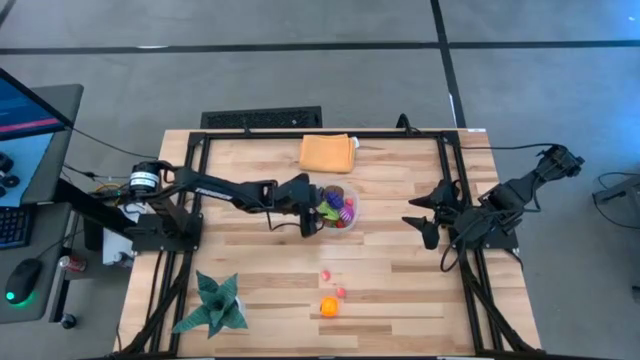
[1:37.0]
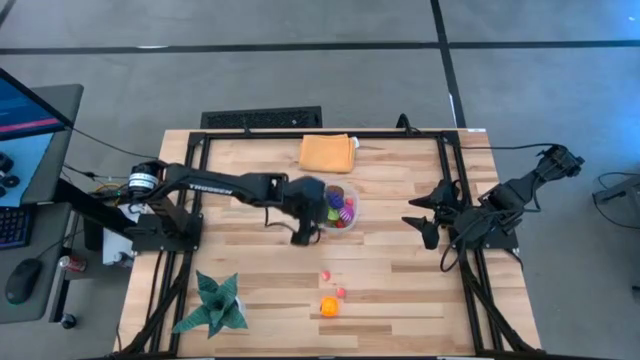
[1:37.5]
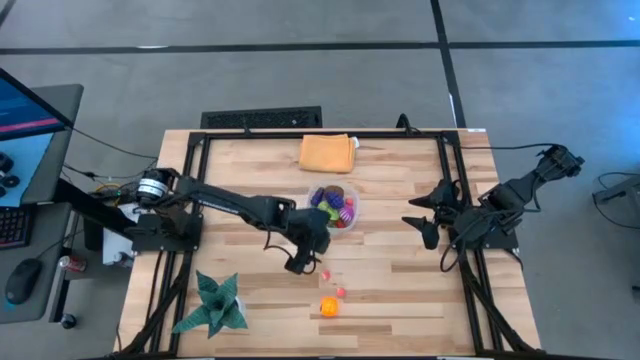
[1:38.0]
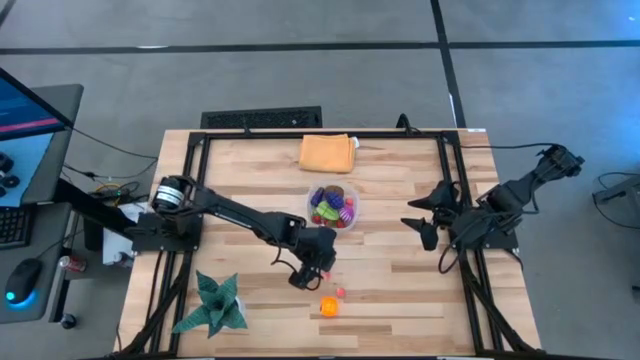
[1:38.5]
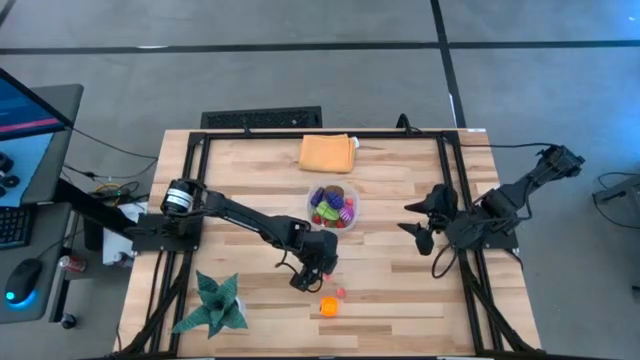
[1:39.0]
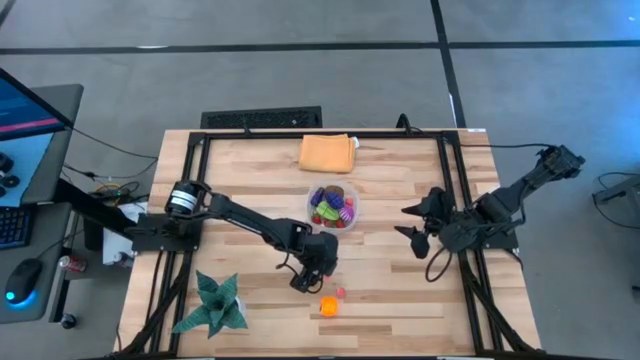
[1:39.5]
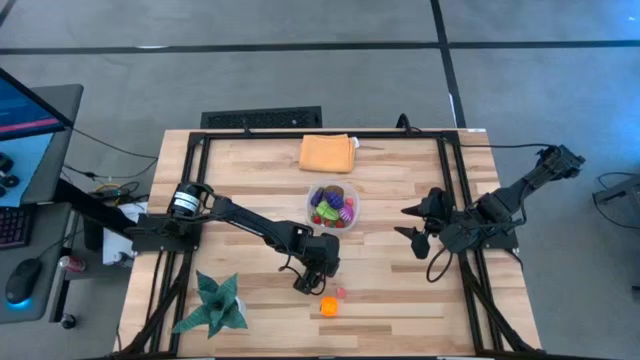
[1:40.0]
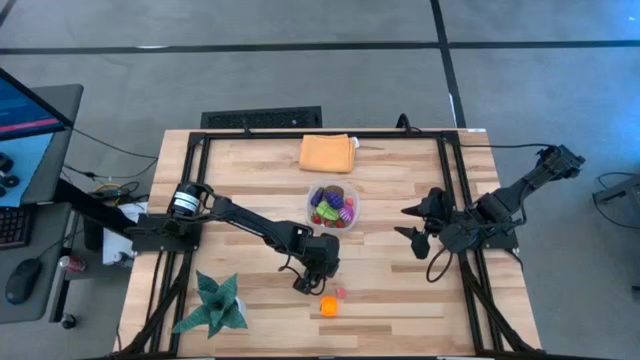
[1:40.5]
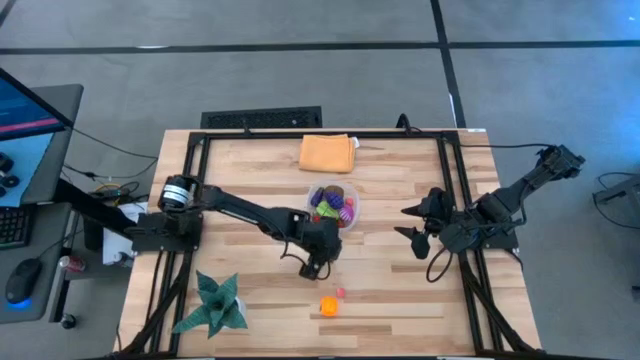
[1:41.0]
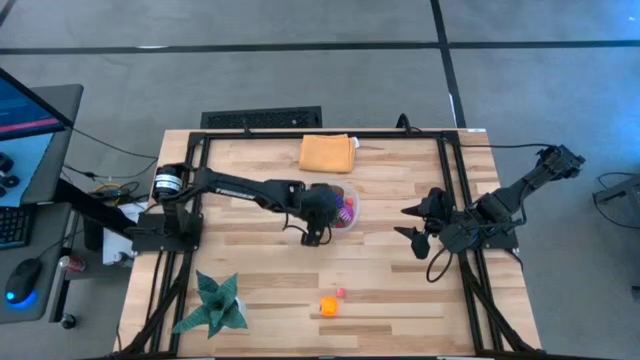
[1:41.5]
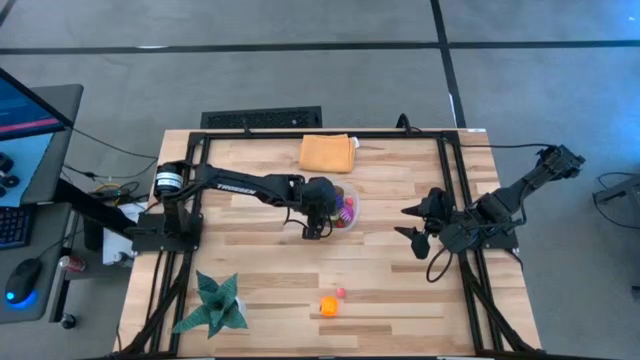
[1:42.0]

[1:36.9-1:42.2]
Task: Pick and placing Produce into tupperware
Put the top pink peach into the transparent container

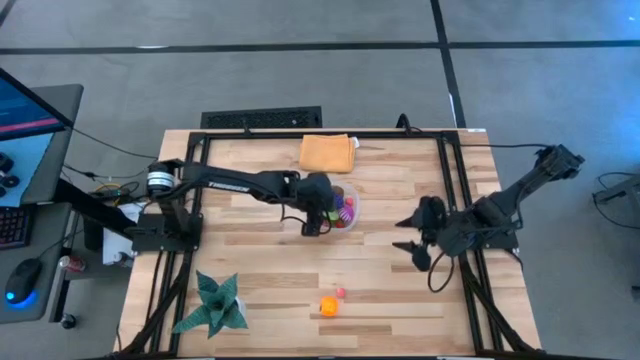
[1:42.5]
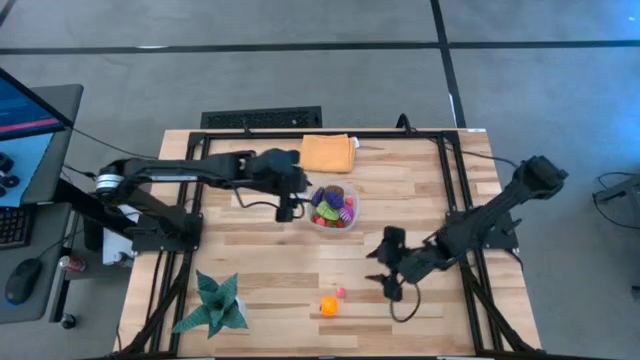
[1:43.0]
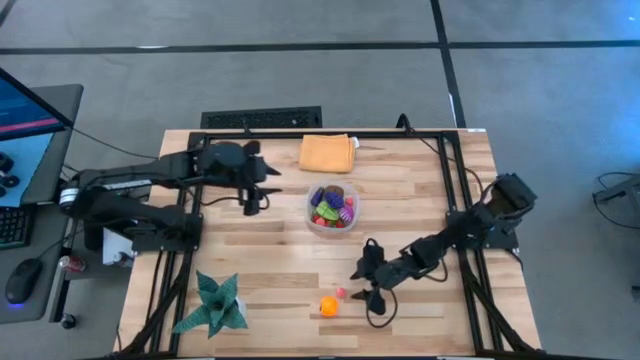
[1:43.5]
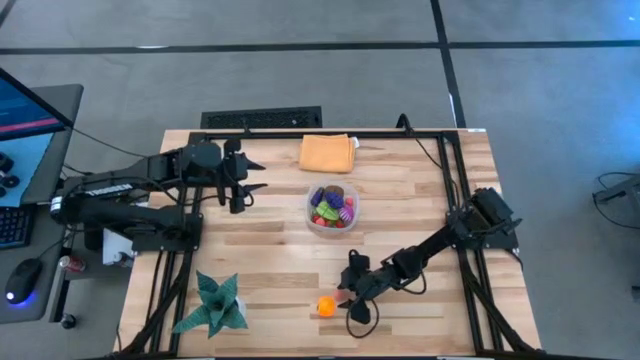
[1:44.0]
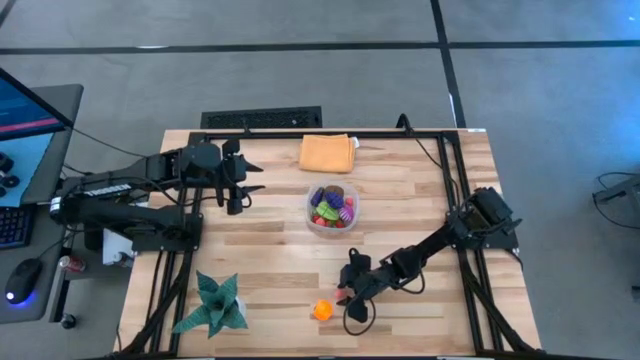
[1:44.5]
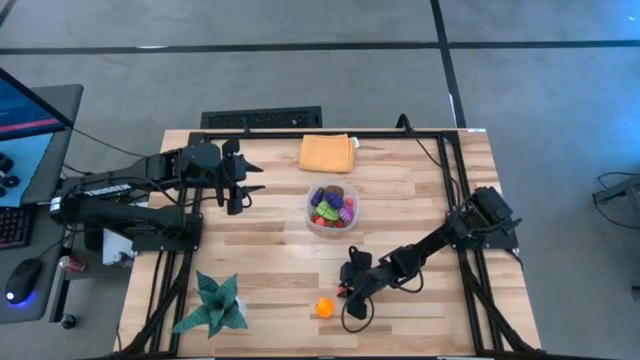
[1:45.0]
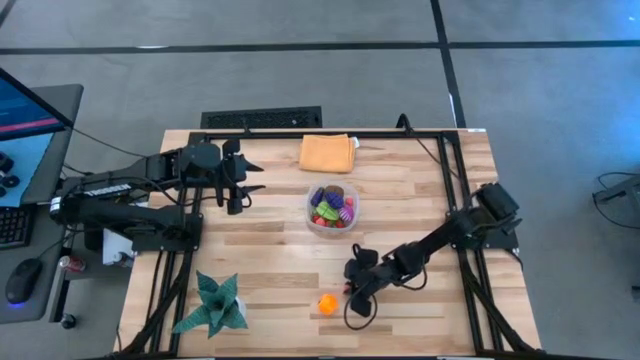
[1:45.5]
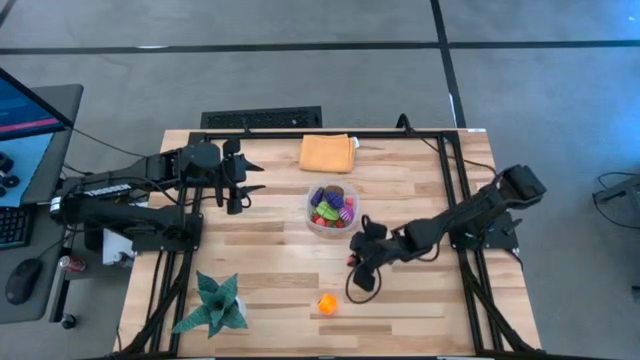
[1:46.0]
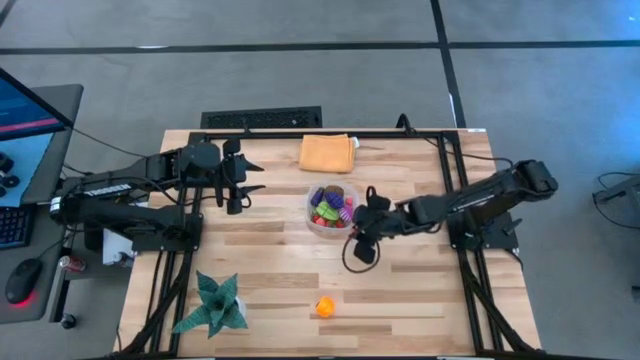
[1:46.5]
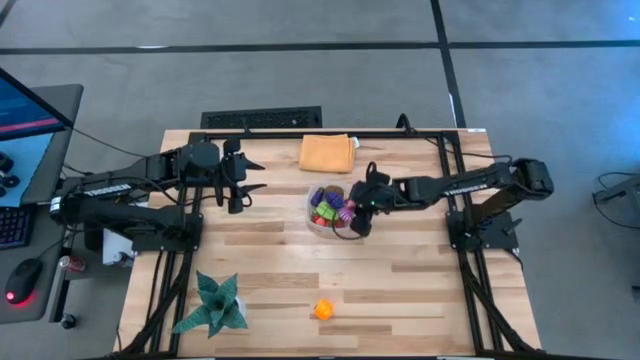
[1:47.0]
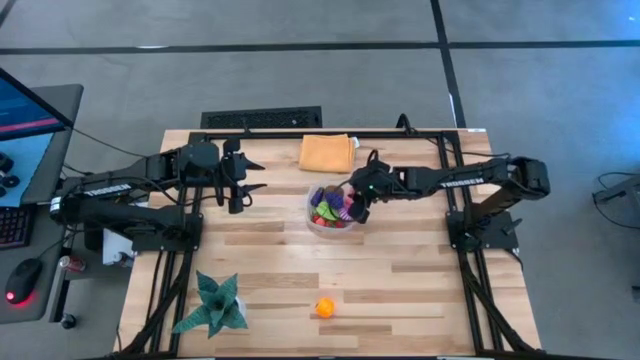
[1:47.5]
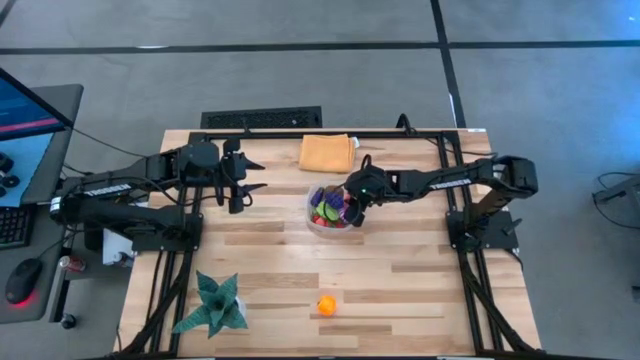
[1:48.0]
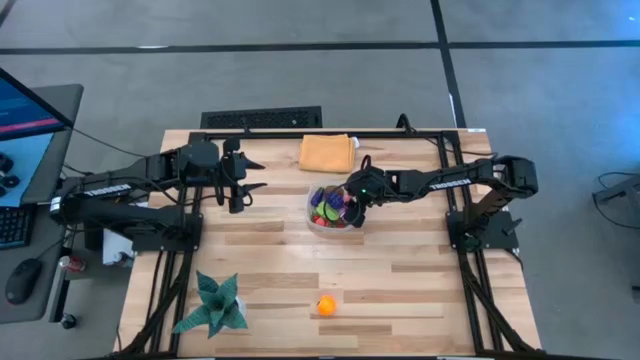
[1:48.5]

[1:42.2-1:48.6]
Put the pink peach into the transparent container

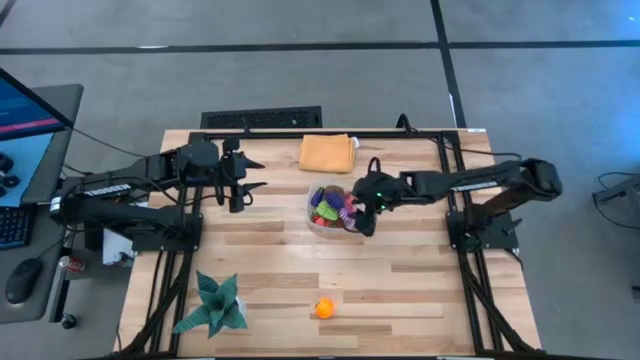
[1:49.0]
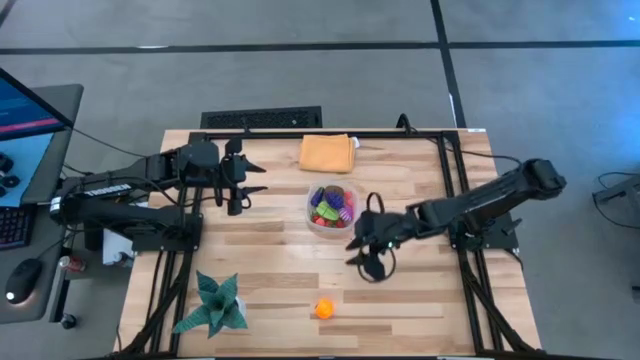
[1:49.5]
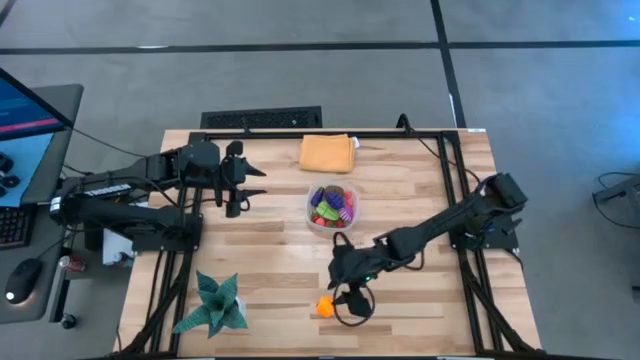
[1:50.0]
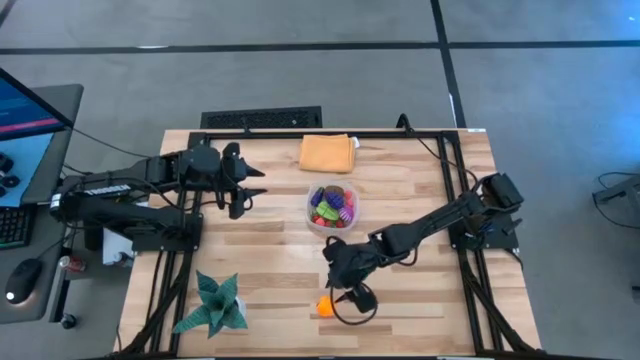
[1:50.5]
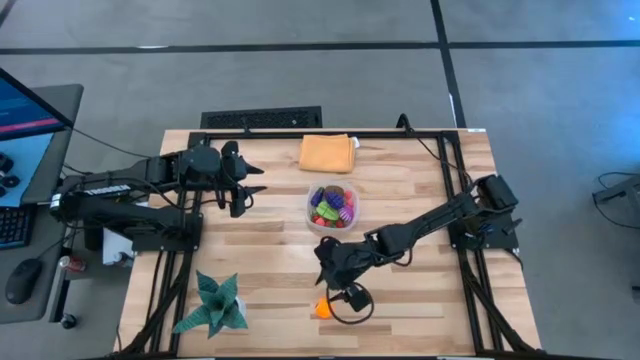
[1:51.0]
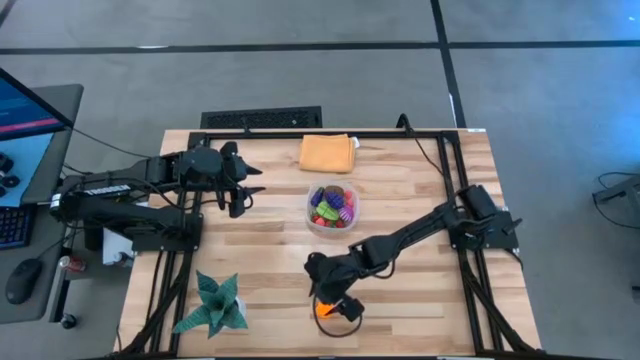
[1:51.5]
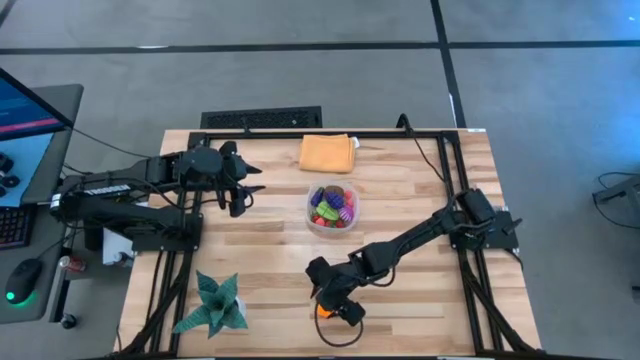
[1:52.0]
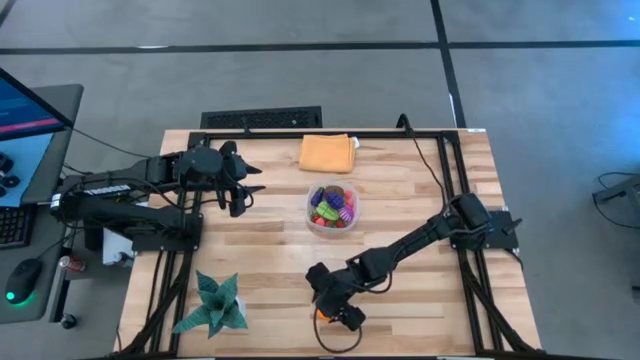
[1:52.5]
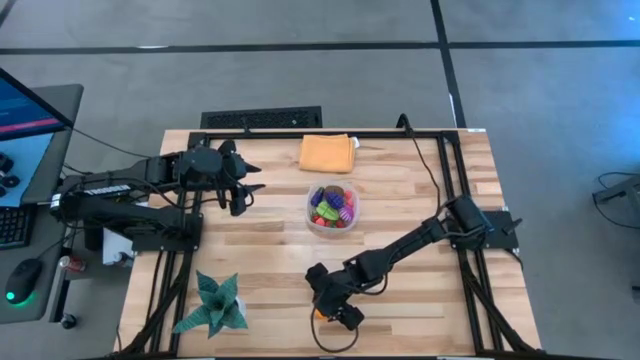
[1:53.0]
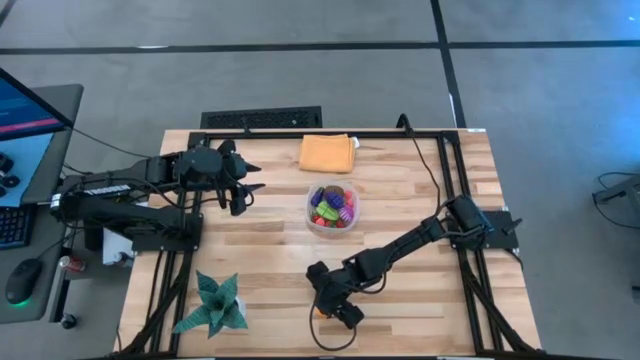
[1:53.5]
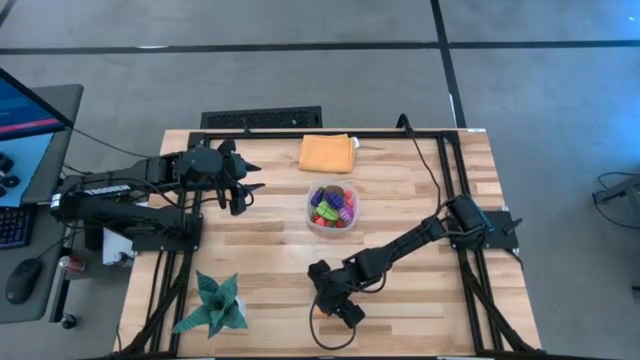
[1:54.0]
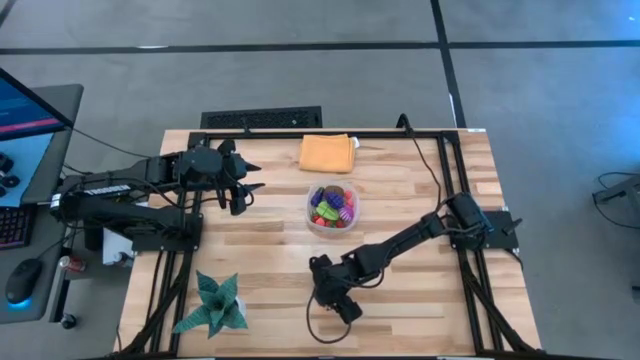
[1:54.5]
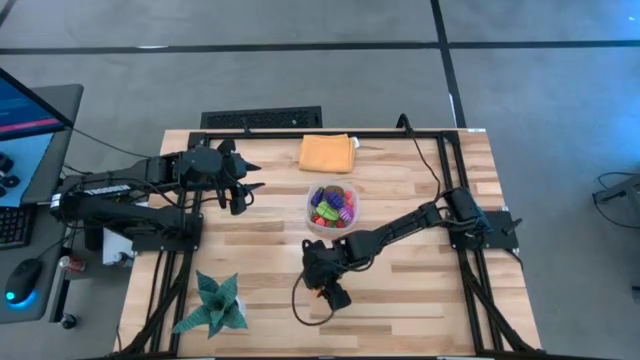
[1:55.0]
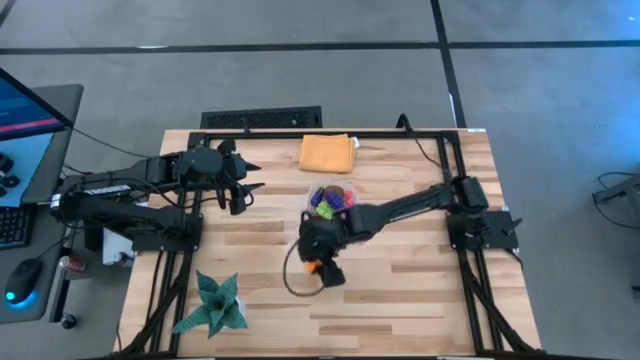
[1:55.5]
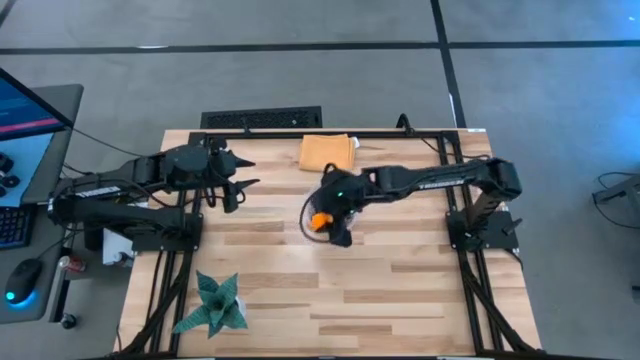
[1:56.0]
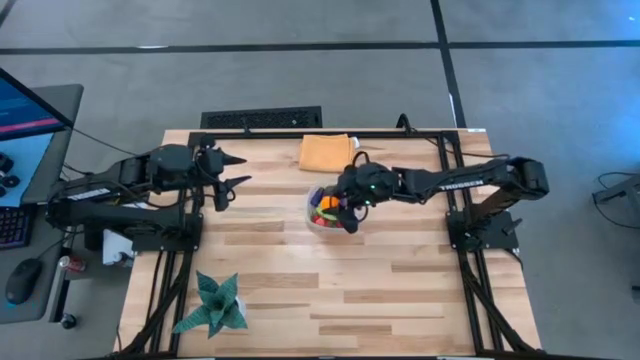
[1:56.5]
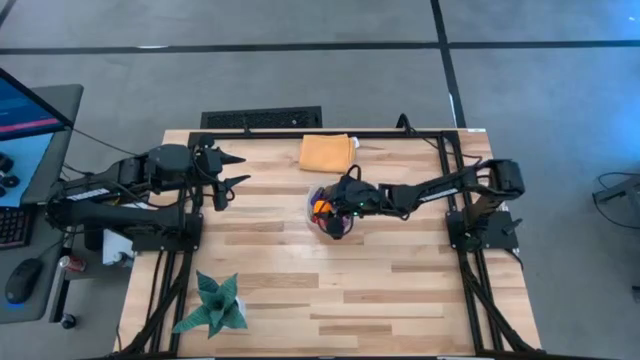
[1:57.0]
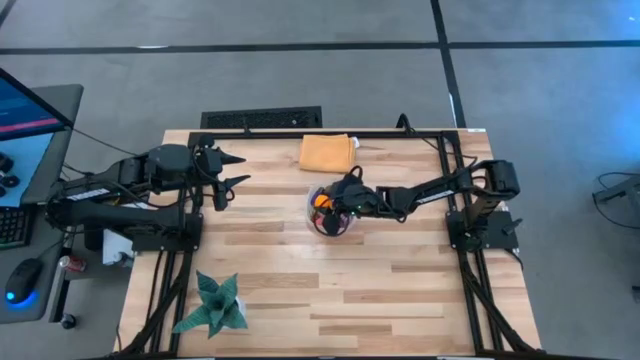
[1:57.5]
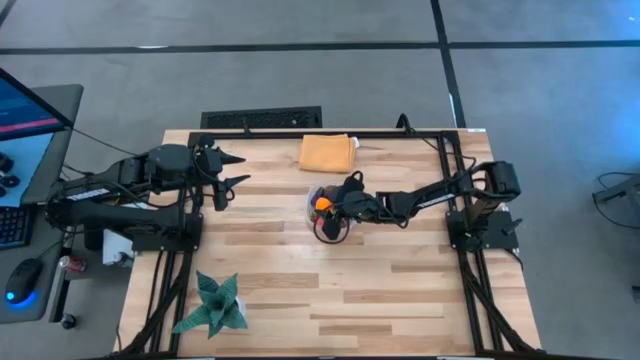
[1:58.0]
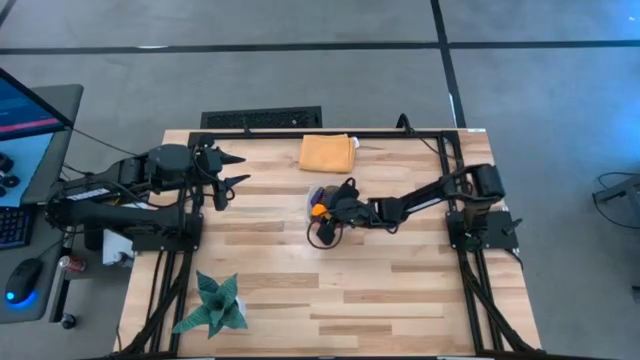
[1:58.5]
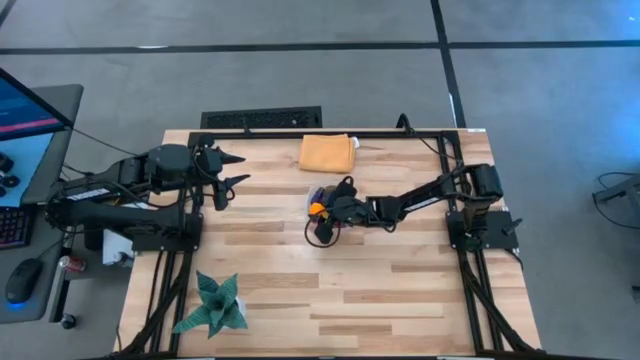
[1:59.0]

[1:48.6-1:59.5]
Put the orange into the transparent container
